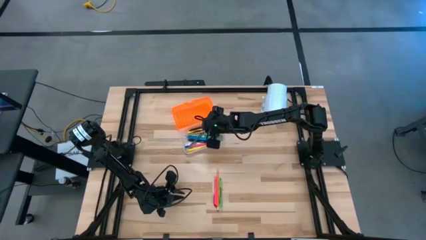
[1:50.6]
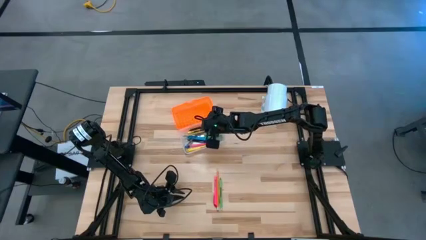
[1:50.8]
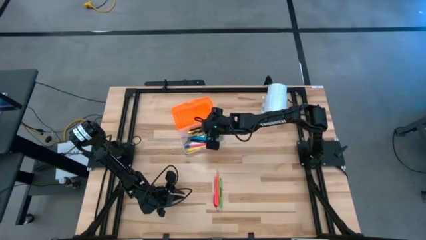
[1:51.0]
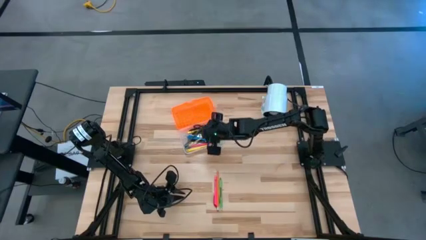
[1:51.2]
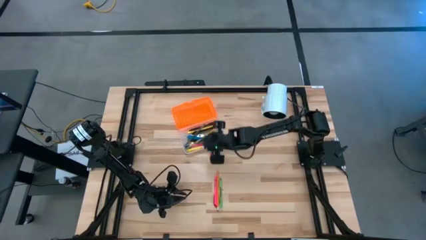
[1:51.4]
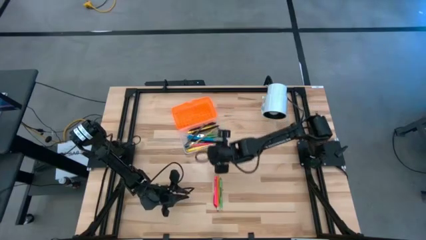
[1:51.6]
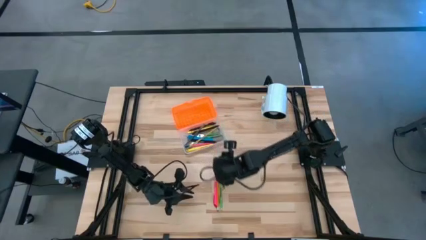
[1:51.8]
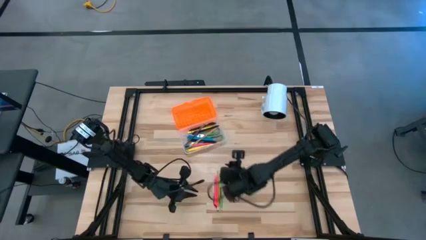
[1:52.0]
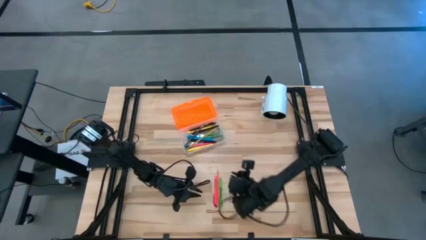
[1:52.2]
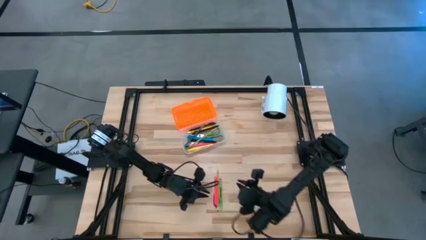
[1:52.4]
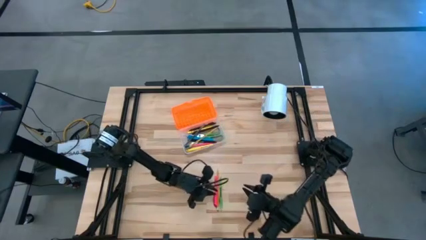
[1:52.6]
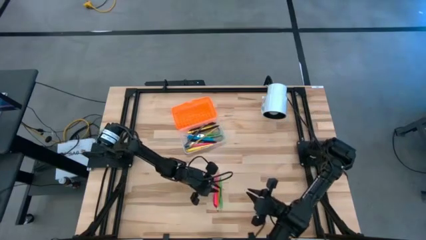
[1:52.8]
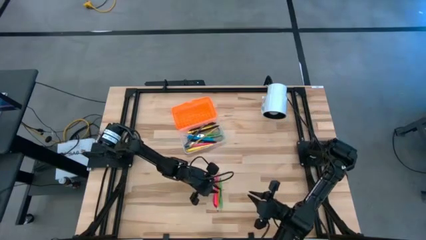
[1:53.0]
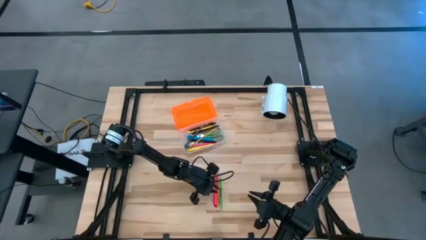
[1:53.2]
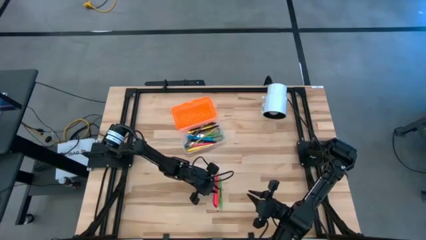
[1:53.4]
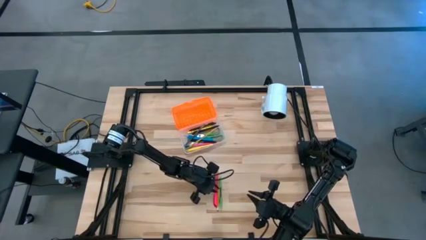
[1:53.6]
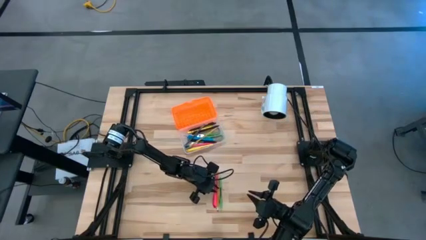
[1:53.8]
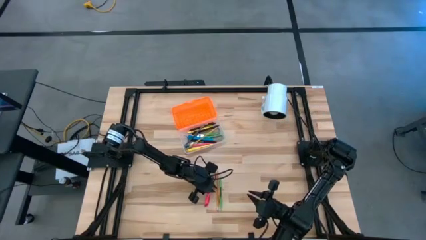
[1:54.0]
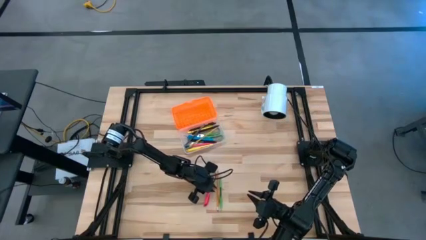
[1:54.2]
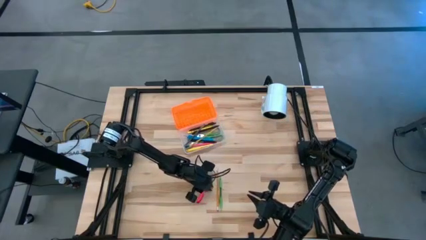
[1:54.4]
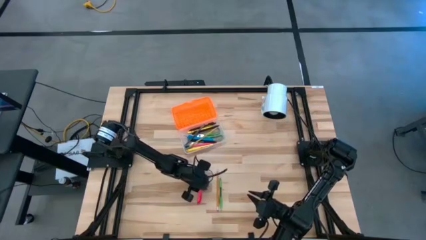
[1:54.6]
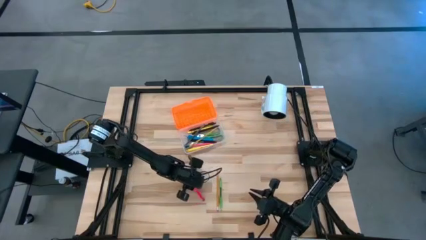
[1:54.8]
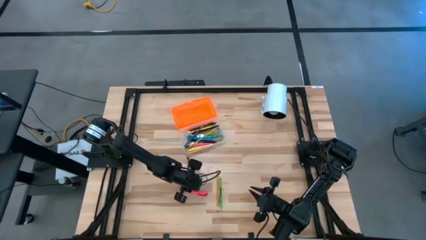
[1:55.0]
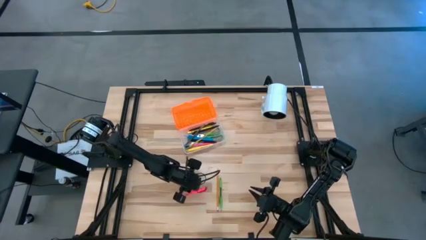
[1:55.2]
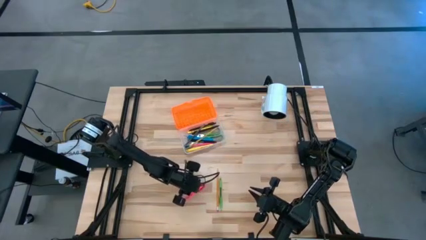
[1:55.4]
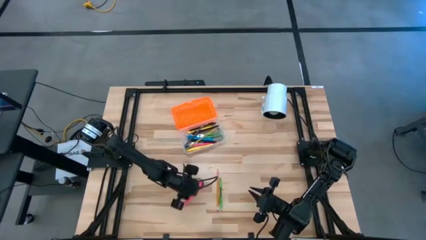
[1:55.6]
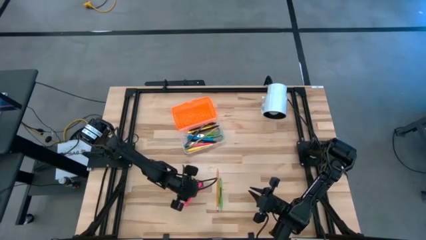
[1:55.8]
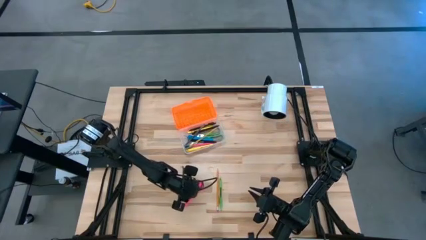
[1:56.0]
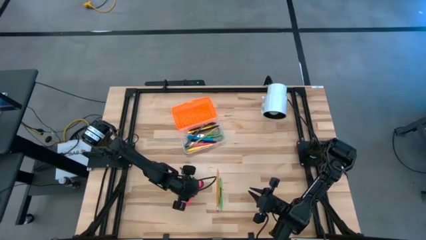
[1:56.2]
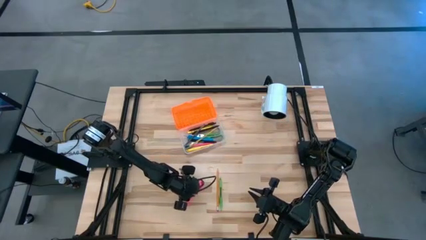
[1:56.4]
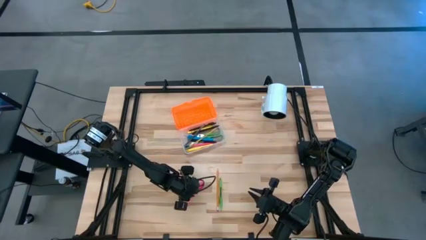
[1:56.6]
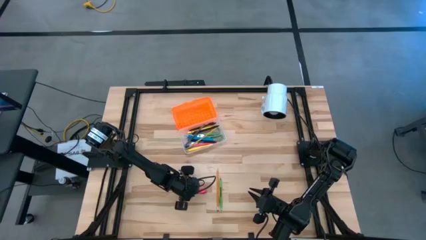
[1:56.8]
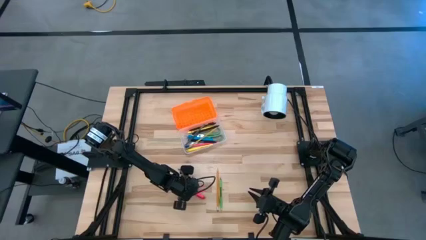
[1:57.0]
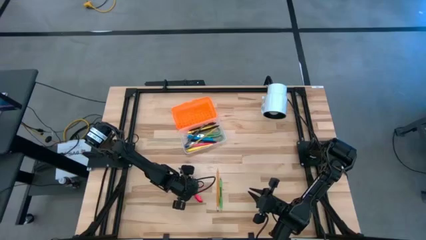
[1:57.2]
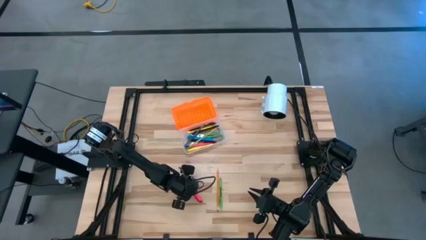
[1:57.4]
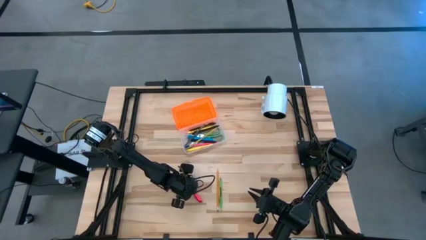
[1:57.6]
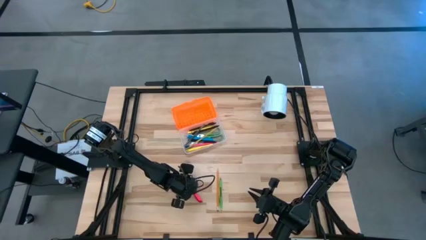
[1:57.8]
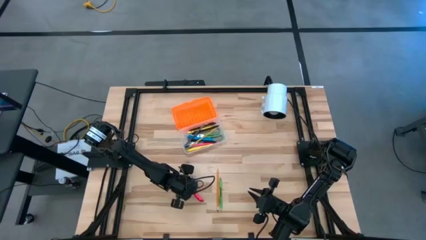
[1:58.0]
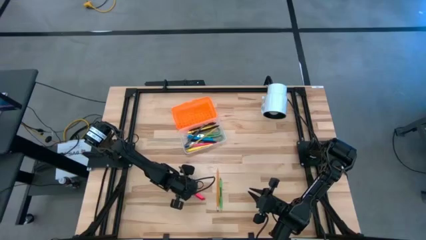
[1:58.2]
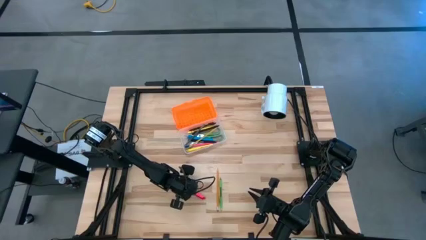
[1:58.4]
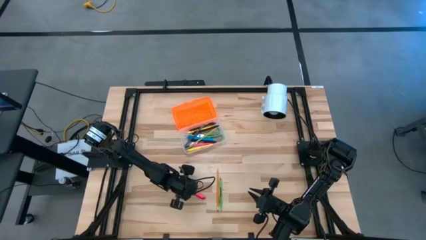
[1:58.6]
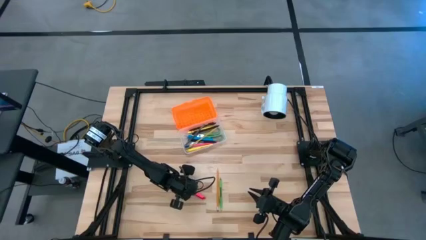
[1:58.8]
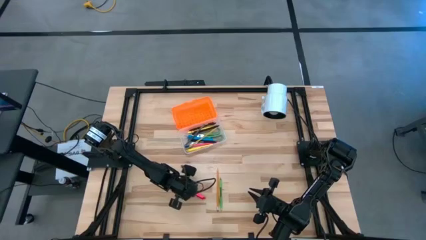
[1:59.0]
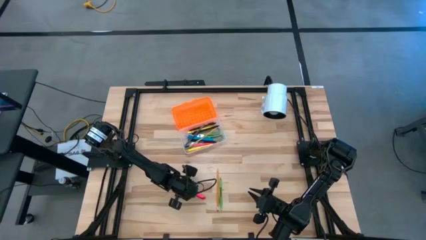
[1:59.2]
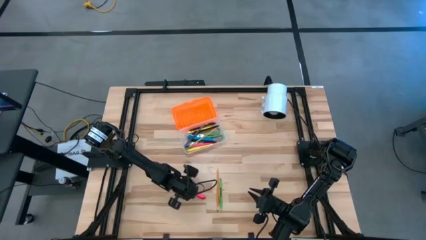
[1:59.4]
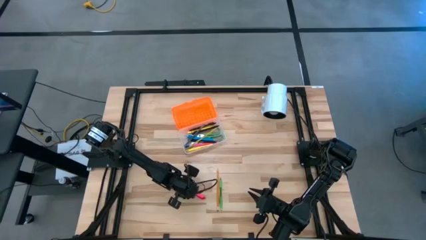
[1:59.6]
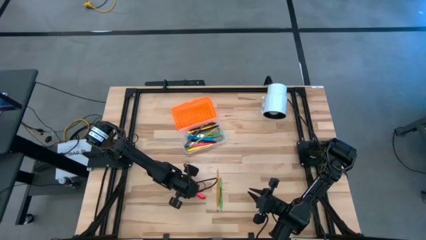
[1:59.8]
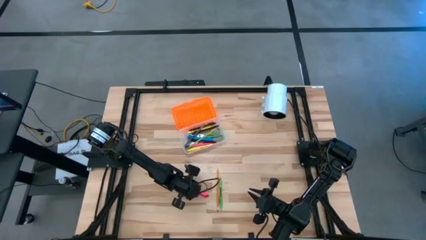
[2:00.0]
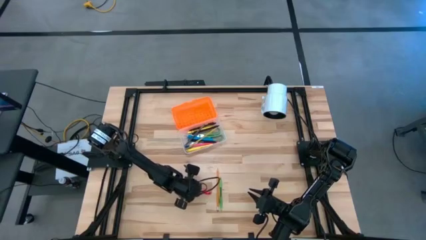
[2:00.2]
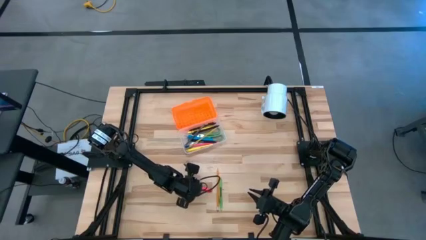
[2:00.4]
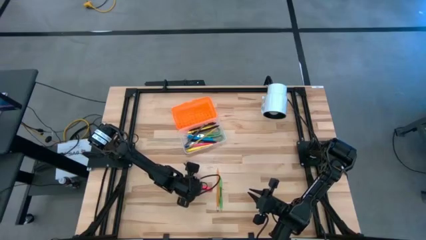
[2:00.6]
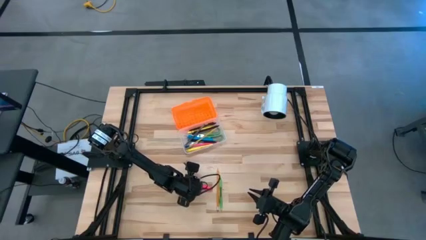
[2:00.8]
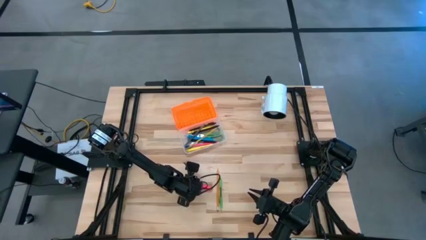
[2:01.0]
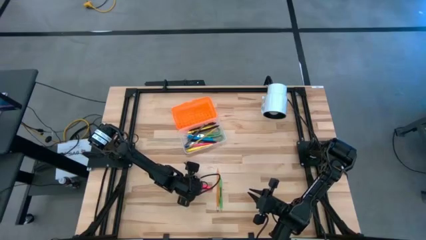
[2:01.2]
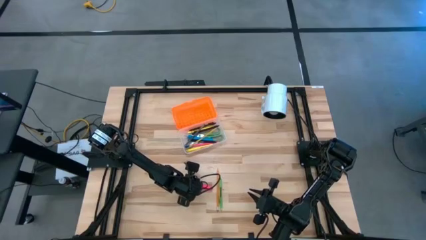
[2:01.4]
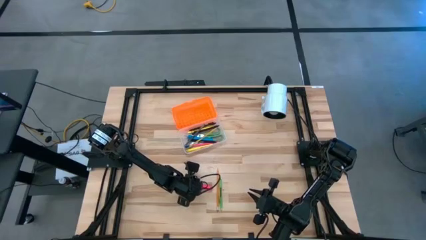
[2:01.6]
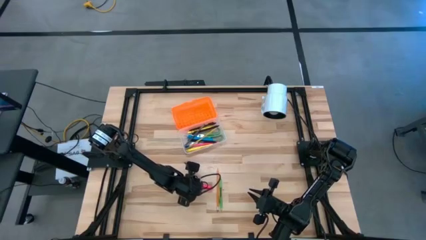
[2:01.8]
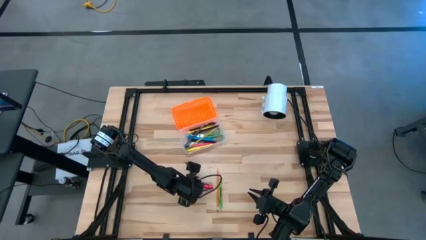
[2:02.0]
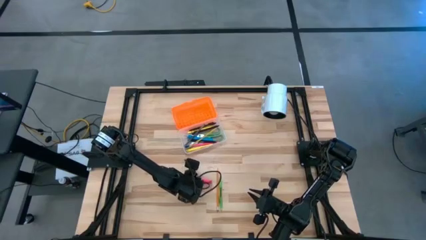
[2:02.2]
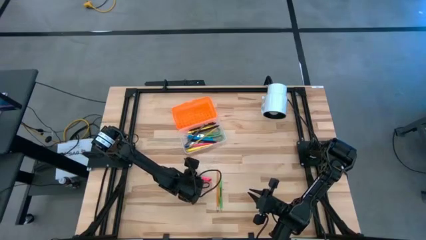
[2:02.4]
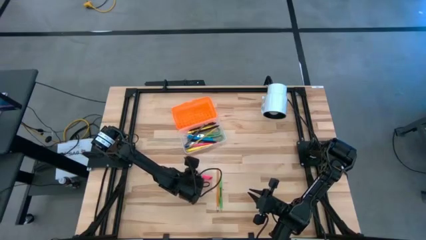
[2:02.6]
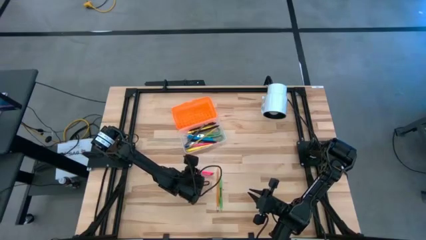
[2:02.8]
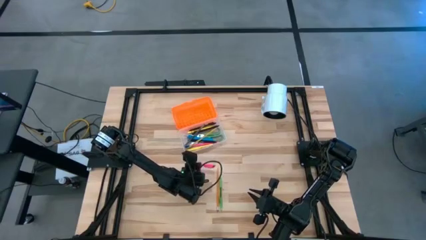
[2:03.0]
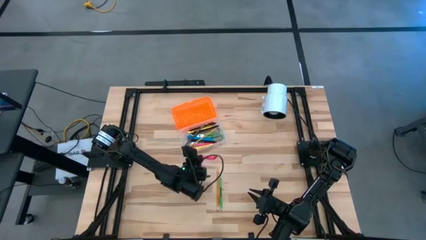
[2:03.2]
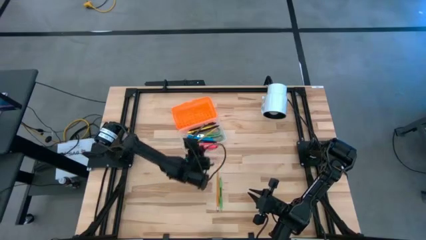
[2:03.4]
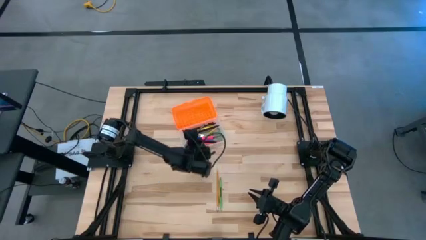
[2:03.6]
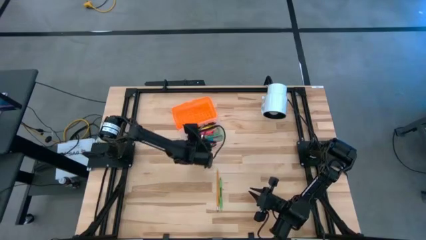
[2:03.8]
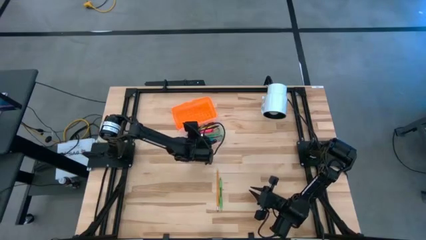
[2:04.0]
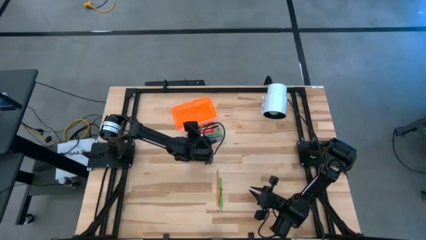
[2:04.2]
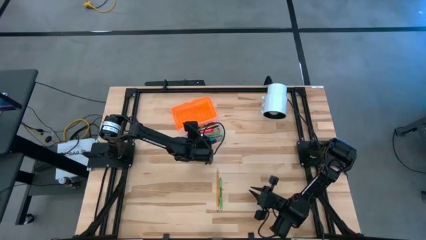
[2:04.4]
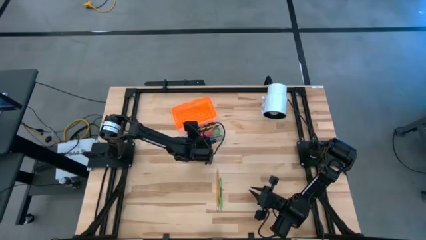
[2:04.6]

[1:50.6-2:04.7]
Task: Pick & place school supplies into a supply box
Put the pink pen into the supply box

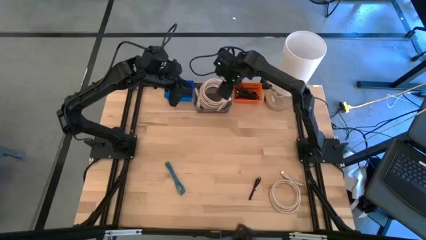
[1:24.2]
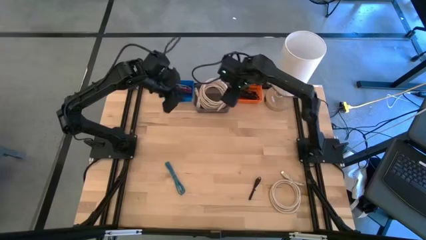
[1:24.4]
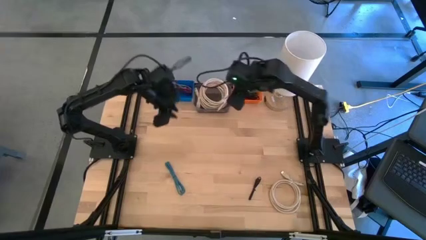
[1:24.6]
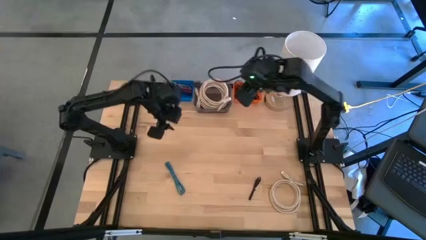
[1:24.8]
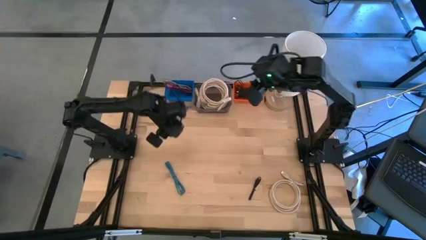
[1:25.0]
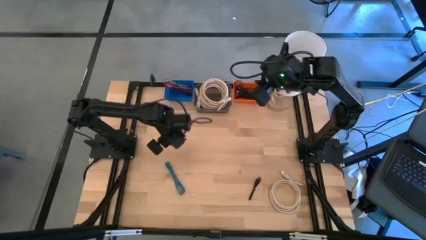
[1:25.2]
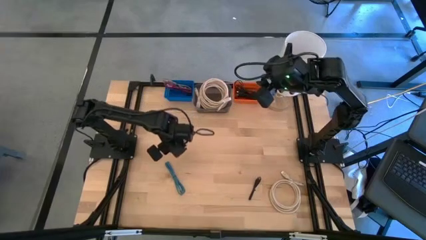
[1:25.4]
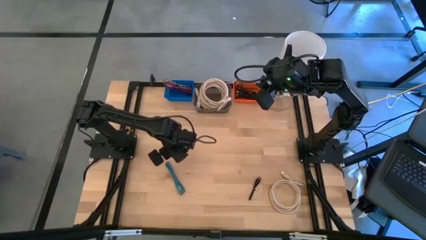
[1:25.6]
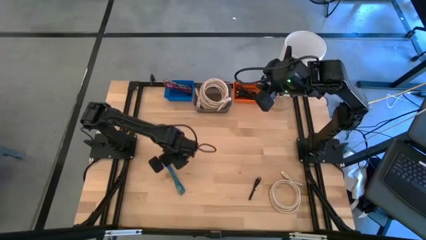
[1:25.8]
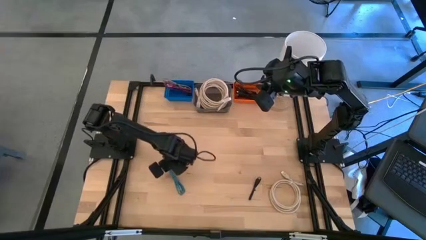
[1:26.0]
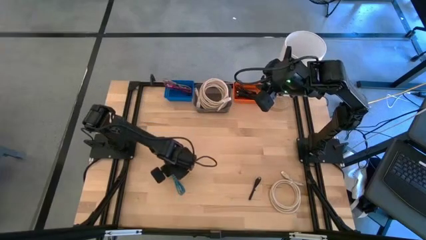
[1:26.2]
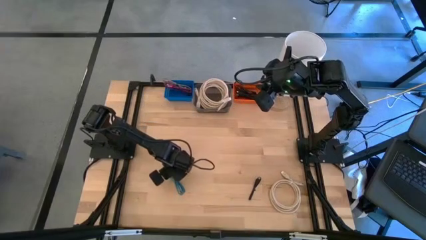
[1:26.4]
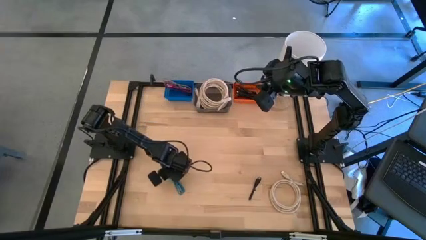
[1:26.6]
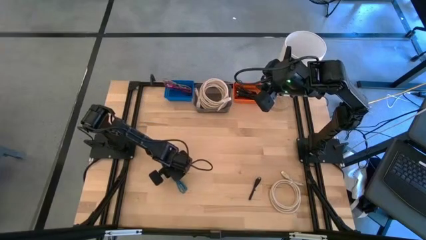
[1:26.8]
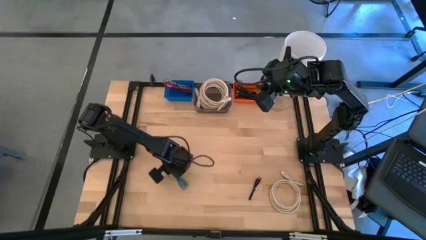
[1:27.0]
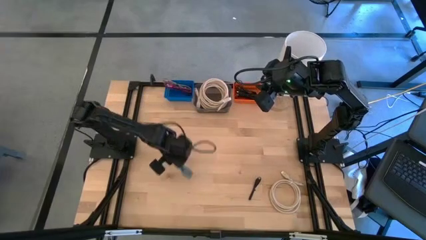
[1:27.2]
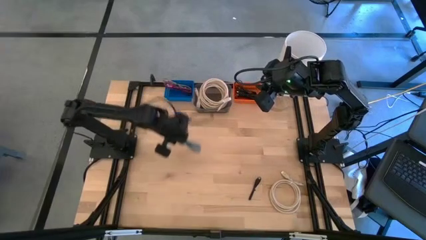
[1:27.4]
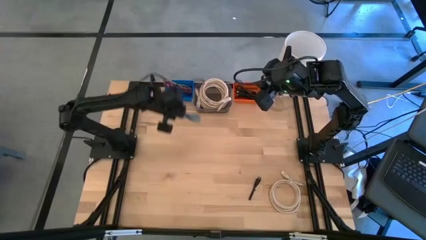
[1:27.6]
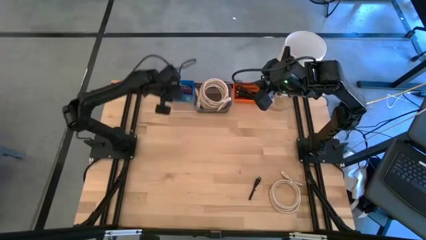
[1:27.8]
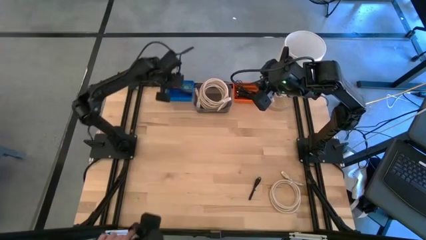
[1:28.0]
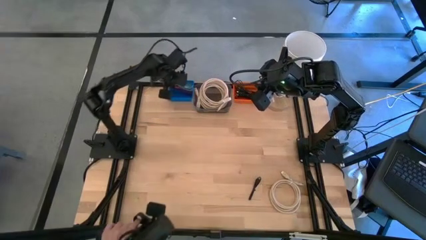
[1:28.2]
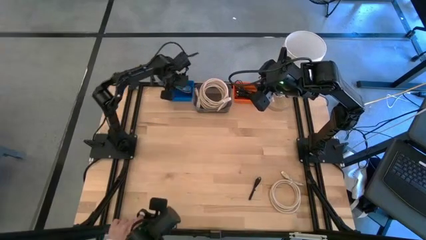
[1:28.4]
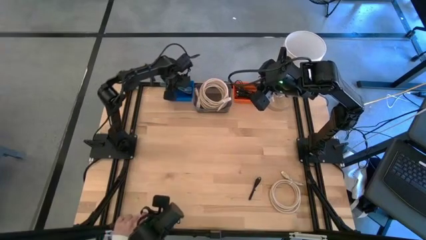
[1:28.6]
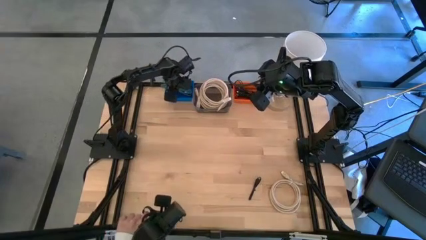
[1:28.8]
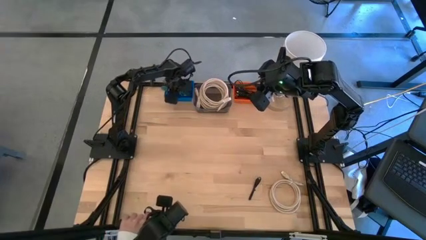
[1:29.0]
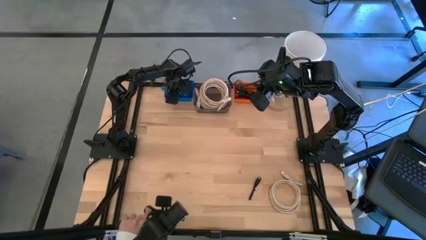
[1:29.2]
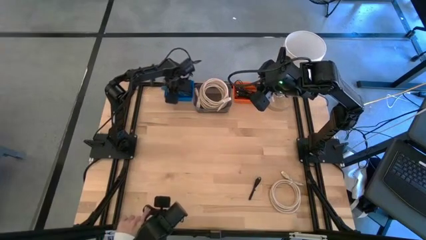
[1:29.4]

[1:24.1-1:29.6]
Task: Pick & Place USB Port
Put the blue black charger cable into the blue bin
